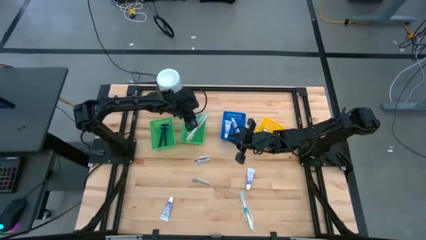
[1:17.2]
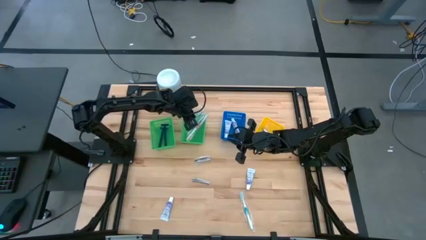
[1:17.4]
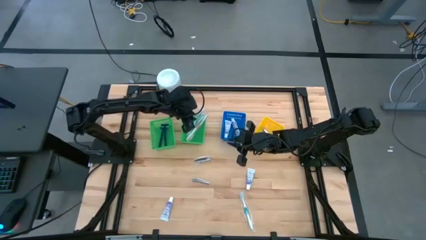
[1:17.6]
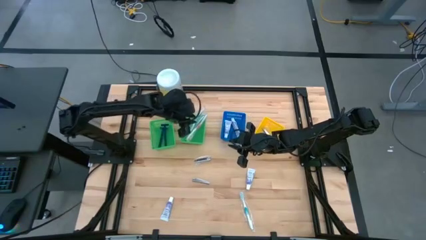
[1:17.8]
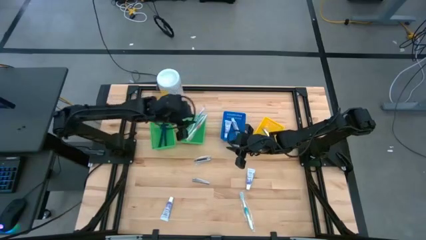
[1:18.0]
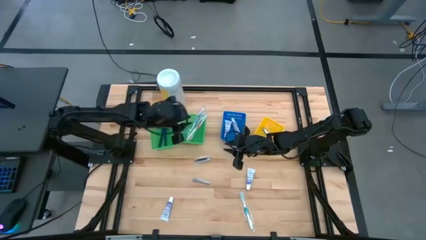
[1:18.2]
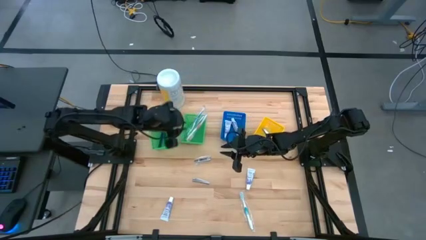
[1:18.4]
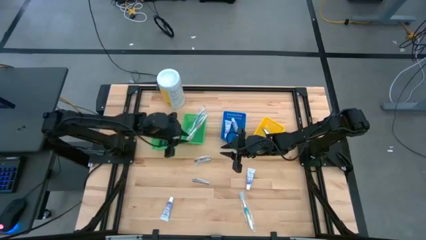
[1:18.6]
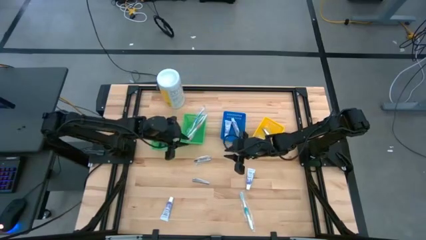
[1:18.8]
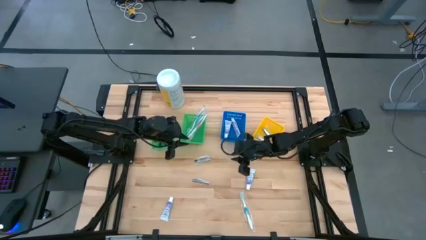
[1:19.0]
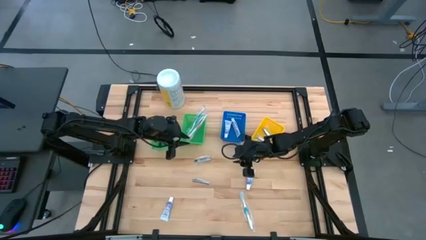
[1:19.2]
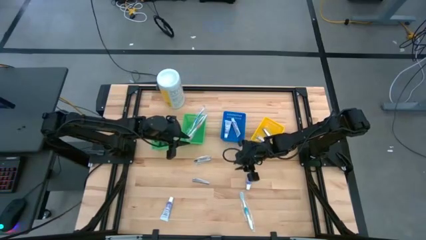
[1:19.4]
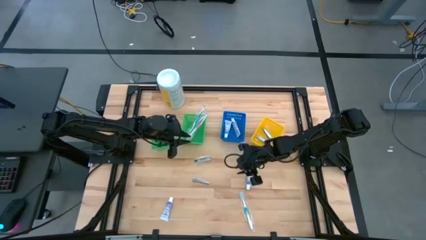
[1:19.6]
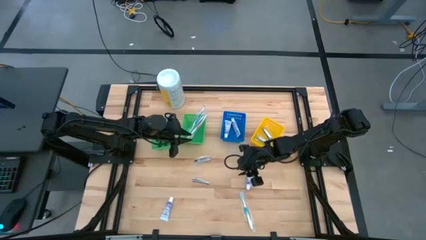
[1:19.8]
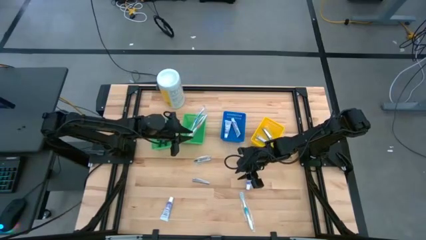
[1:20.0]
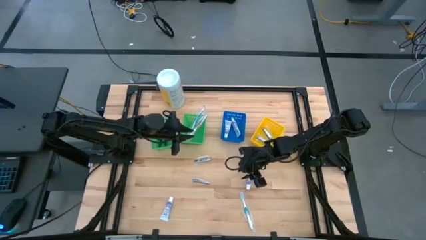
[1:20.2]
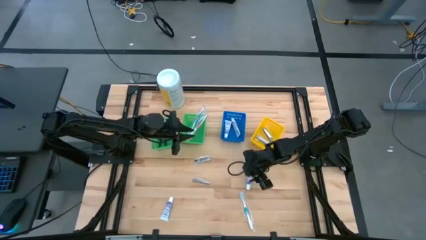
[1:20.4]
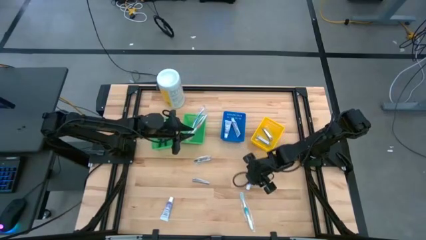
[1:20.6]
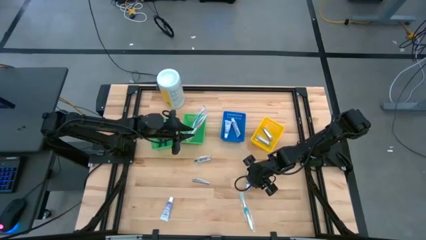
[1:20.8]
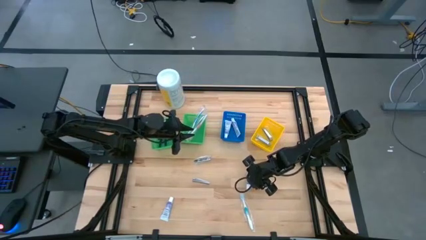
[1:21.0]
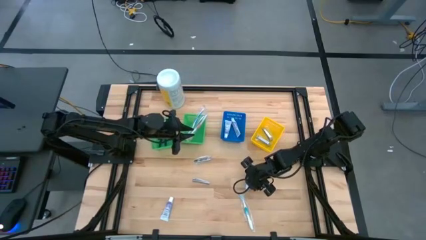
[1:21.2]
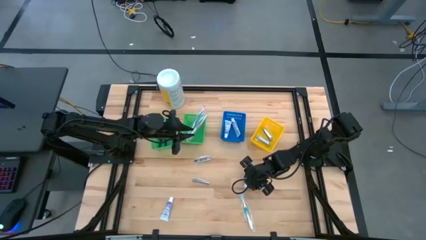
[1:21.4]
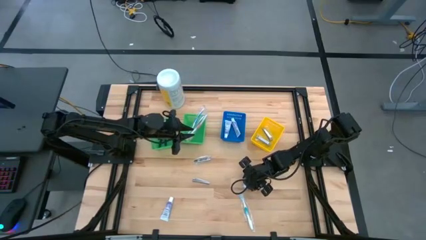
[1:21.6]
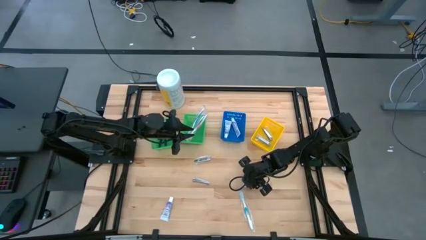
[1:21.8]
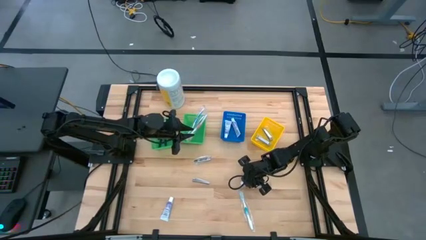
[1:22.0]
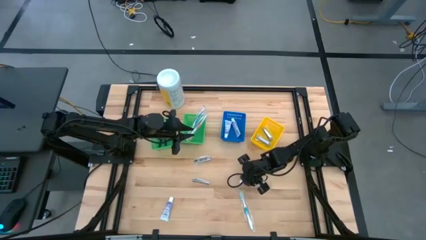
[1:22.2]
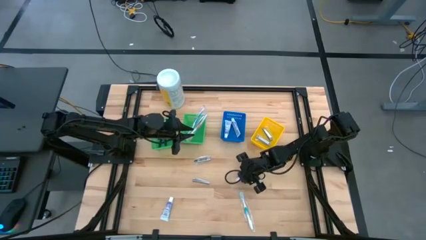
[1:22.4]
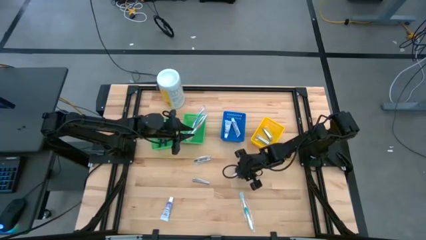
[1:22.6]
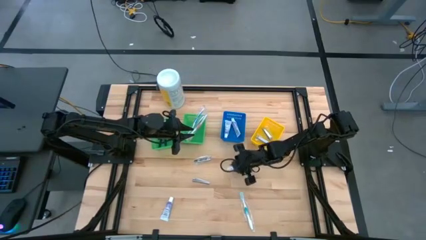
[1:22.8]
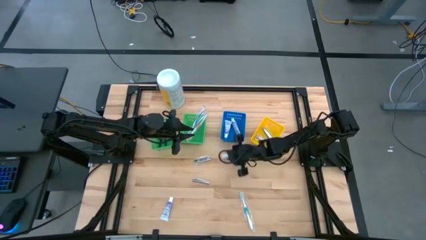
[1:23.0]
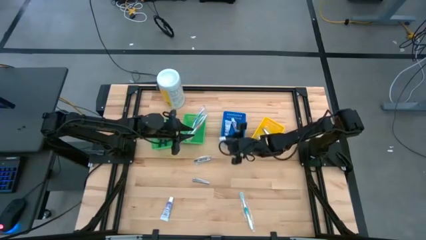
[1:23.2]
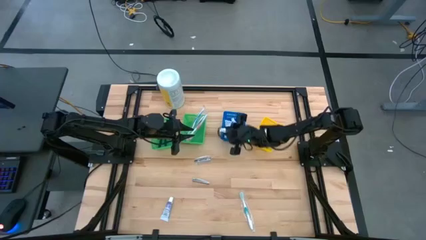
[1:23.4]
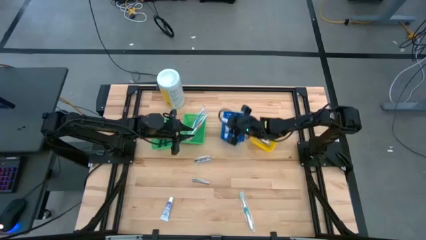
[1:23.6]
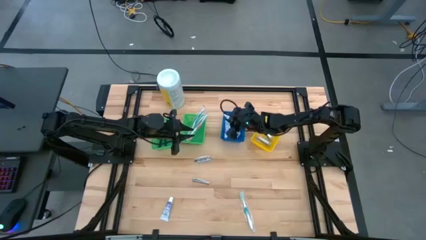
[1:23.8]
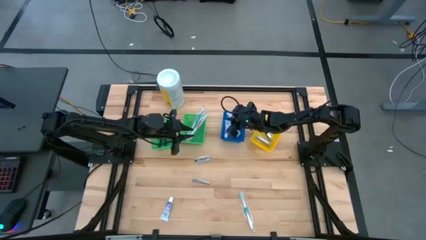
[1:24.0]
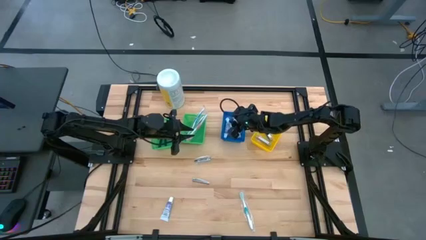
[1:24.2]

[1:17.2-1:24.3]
Task: Pick & Place Travel size toiletries
Put the purple toothpaste into the blue bin

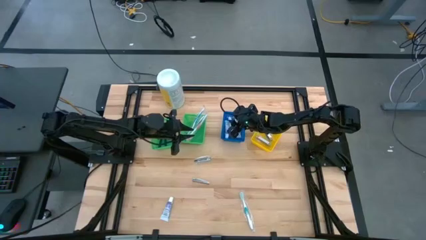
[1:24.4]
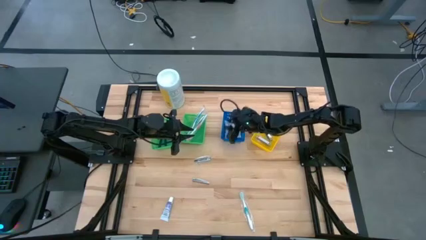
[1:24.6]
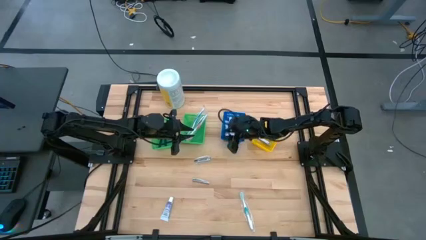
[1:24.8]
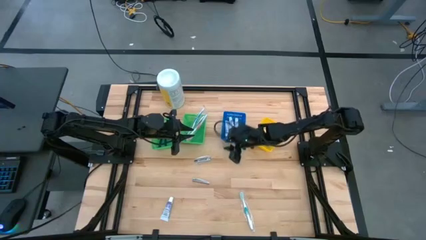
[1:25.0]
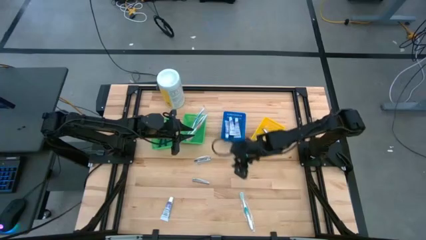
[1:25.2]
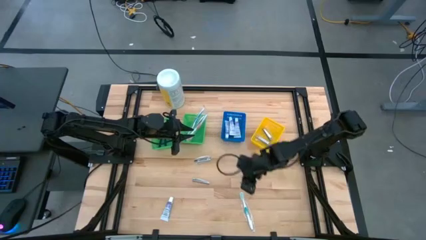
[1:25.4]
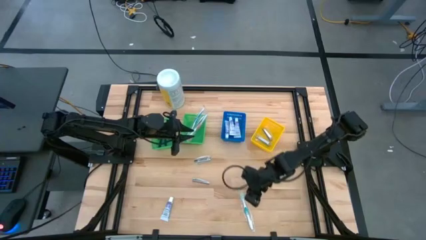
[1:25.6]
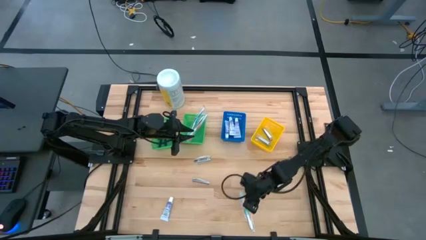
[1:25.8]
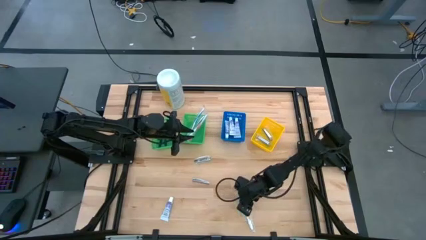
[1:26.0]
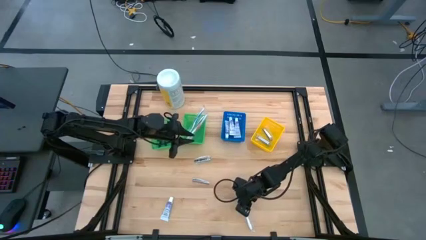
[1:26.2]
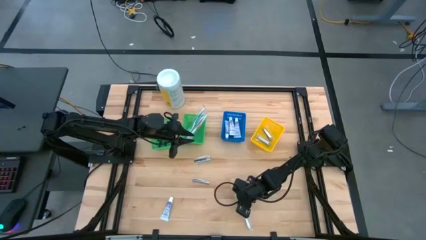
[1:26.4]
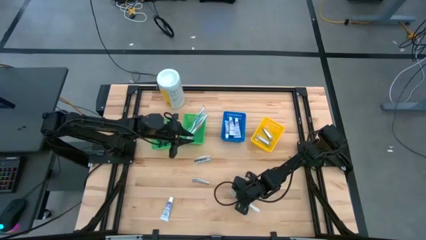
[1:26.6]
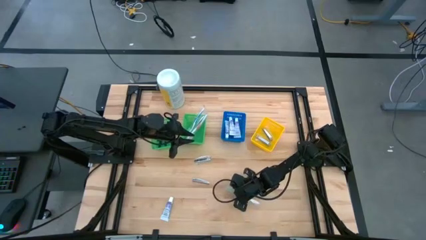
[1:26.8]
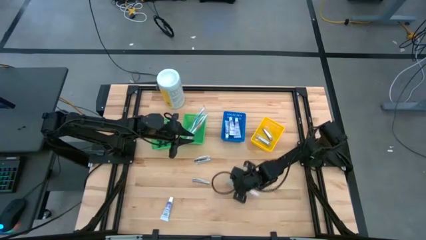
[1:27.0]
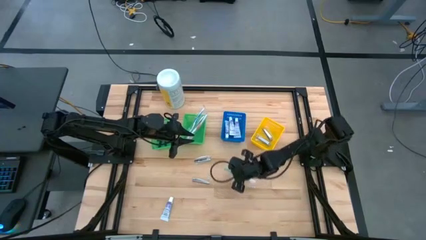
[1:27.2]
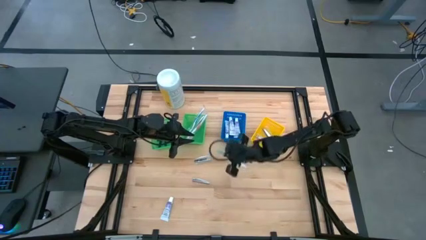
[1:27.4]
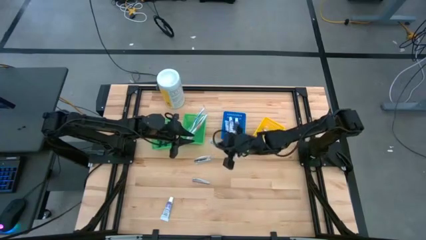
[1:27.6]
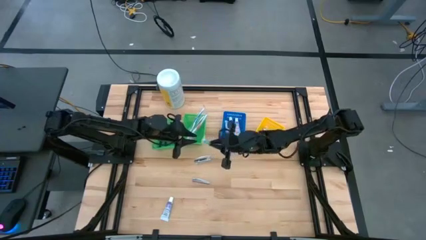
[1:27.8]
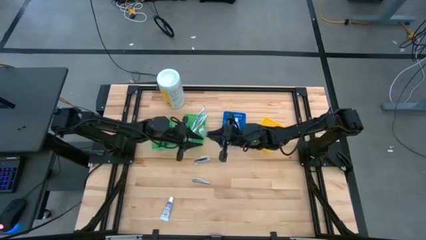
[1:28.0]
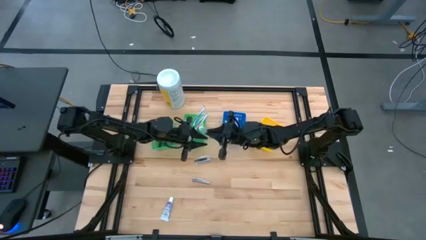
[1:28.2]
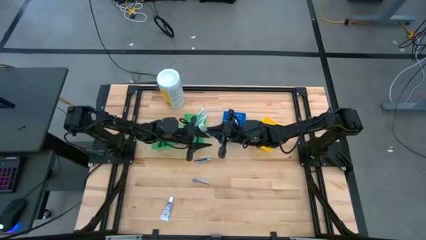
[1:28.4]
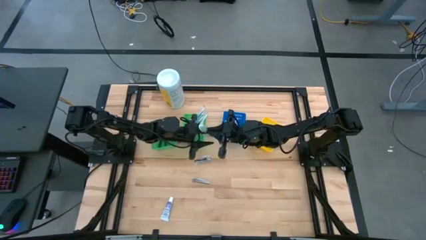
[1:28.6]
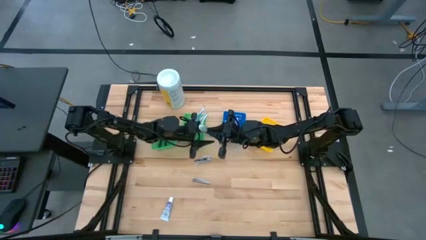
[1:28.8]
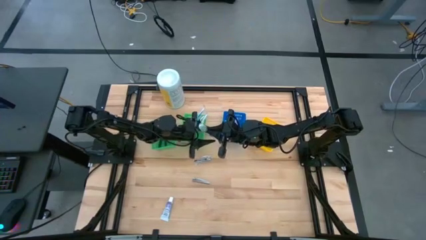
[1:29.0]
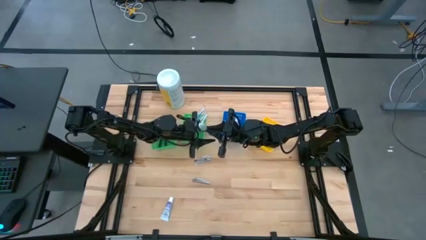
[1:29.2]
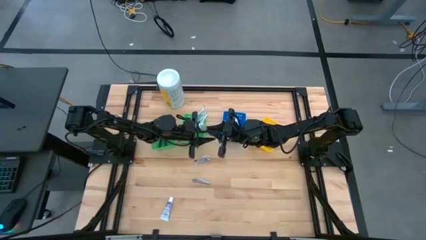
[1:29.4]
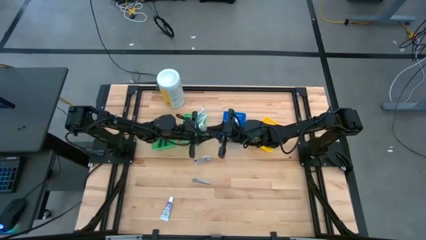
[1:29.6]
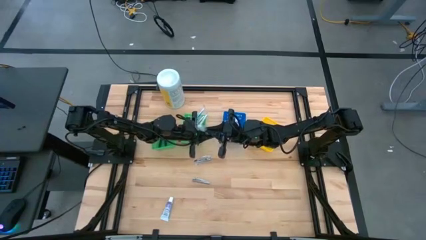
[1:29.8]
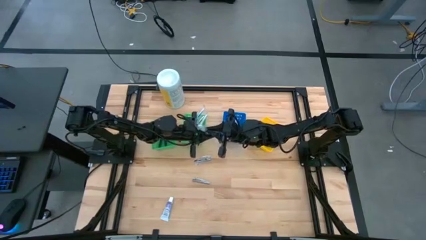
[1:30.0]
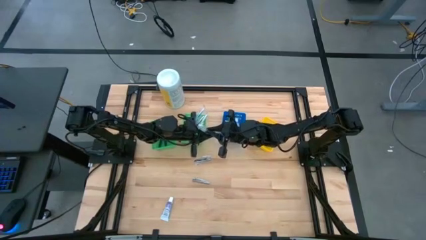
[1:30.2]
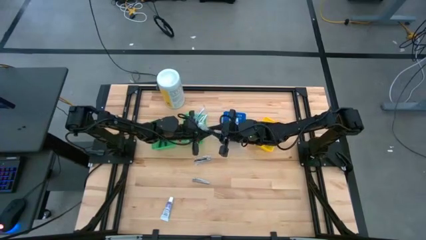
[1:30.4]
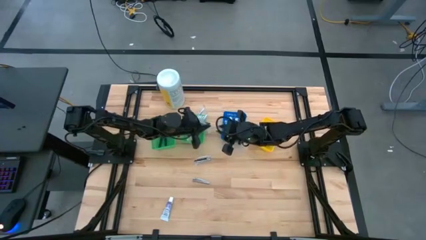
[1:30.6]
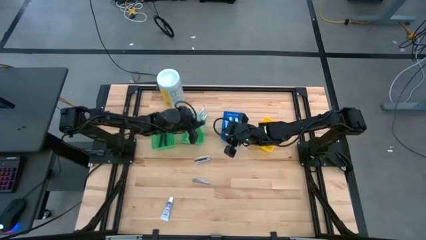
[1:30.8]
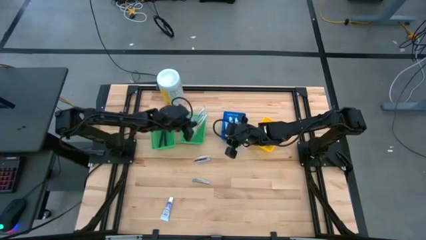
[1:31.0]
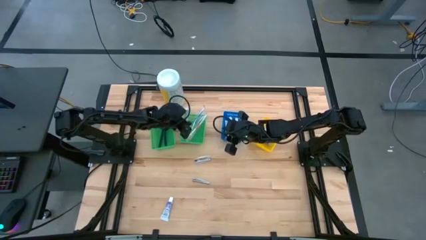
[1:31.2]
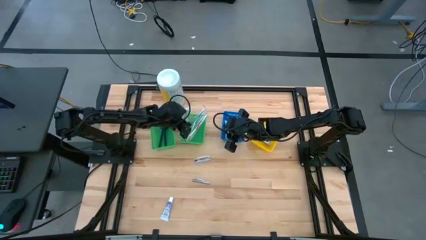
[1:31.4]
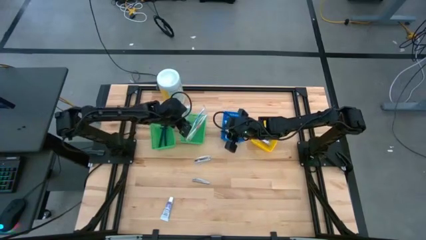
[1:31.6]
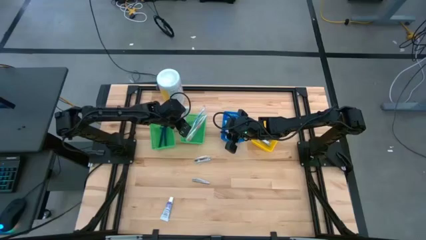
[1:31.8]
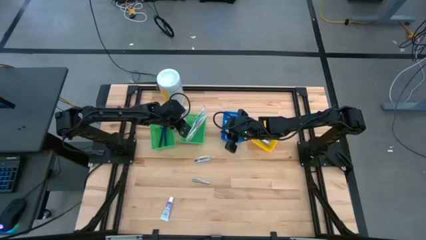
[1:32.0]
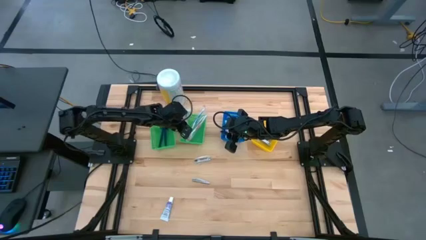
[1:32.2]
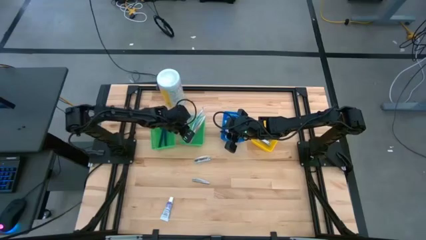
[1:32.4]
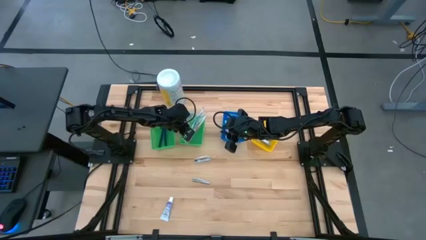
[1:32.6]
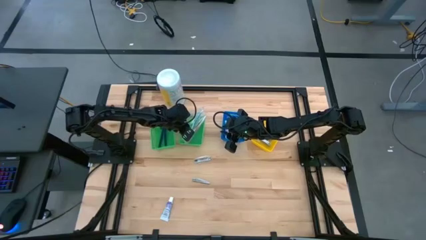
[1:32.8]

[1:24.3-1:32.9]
Put the green toothbrush into the right green bin
